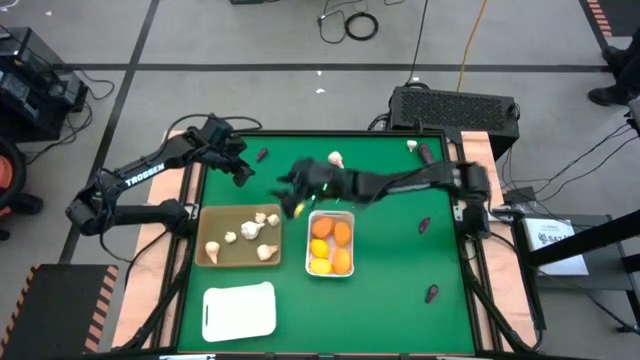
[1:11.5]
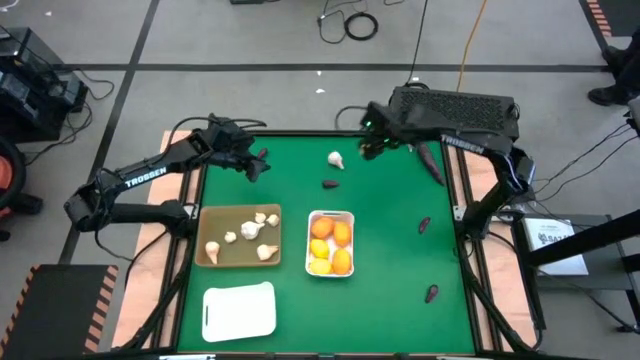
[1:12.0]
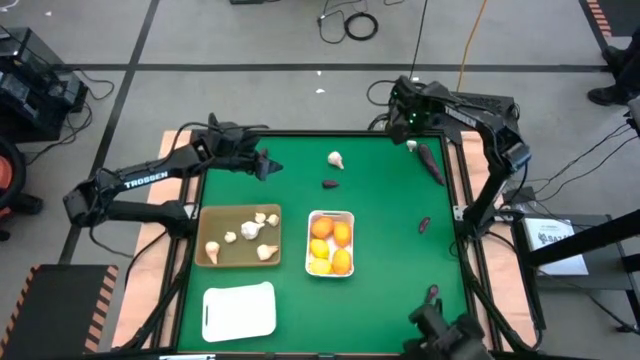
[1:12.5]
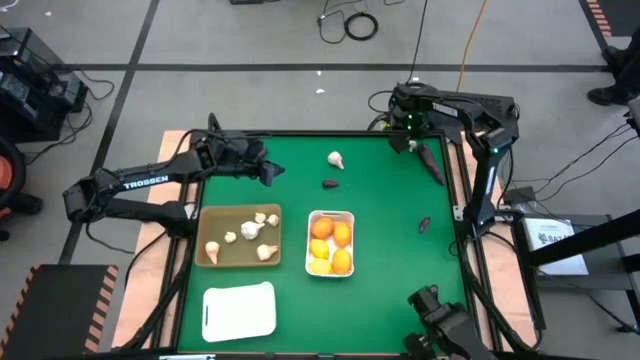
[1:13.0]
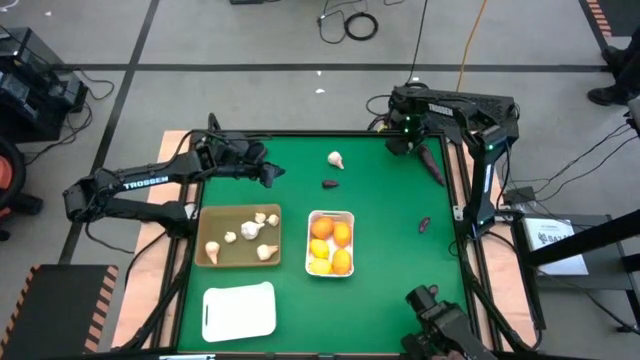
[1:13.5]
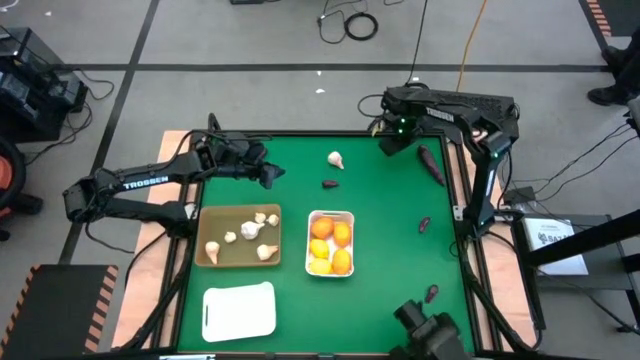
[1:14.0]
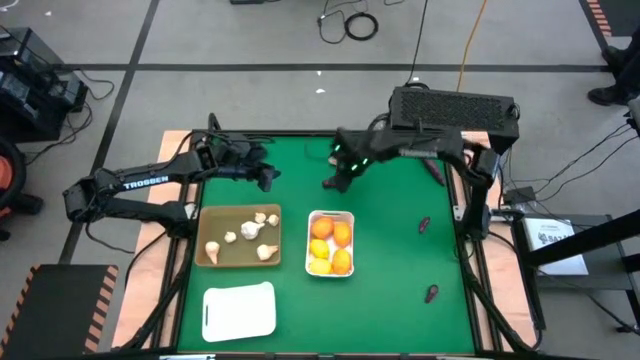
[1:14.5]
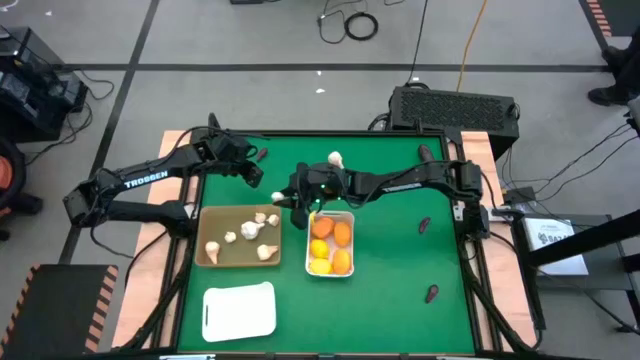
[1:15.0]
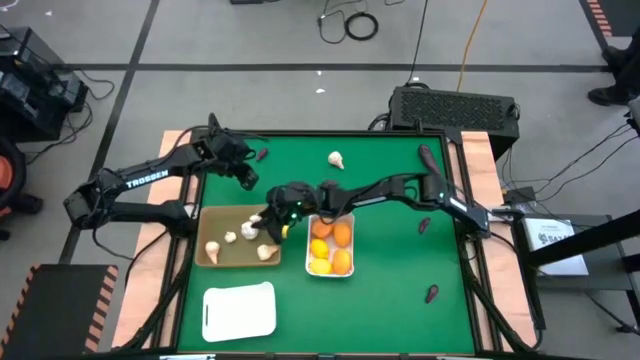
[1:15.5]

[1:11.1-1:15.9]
Task: Sort produce into baskets
Put the white garlic into the orange bin

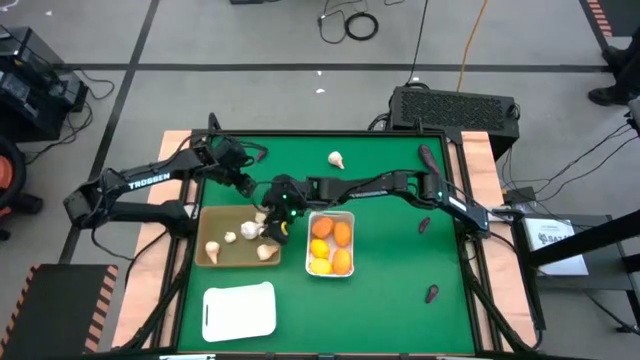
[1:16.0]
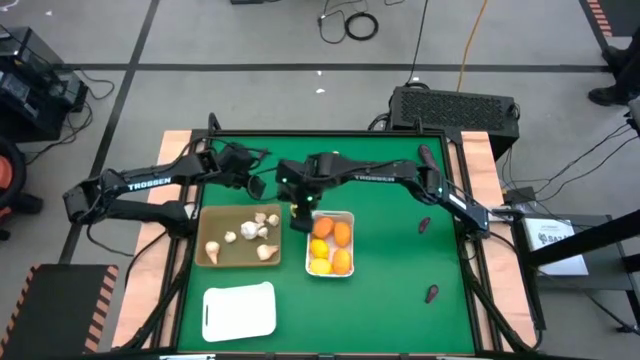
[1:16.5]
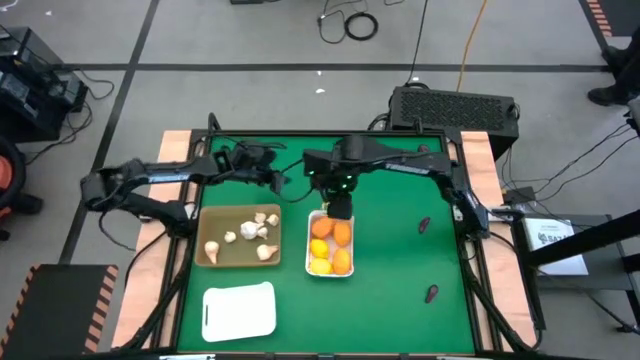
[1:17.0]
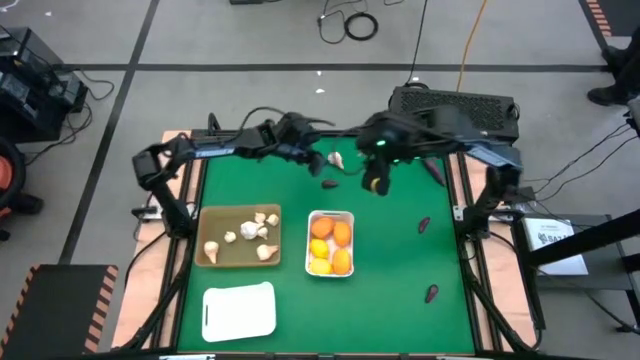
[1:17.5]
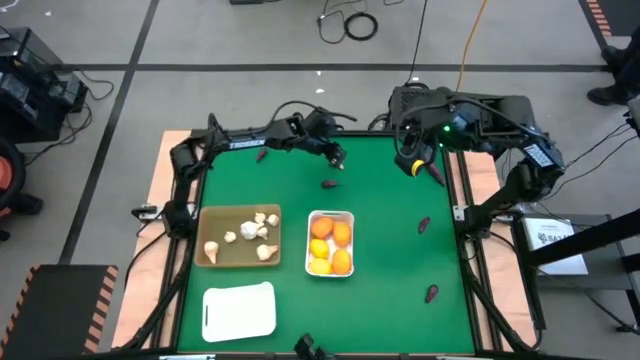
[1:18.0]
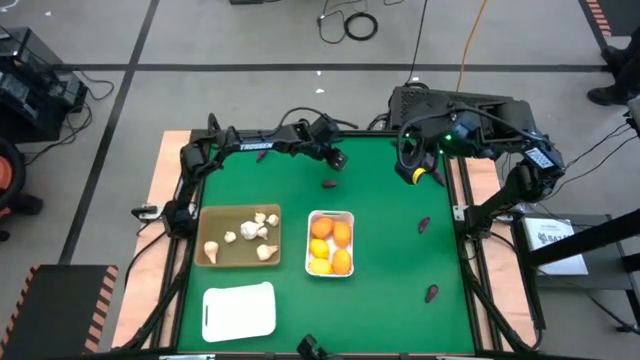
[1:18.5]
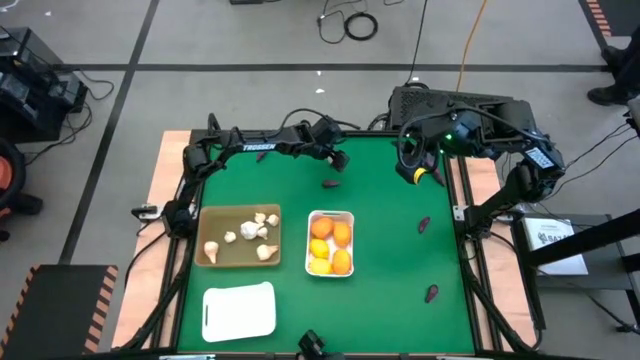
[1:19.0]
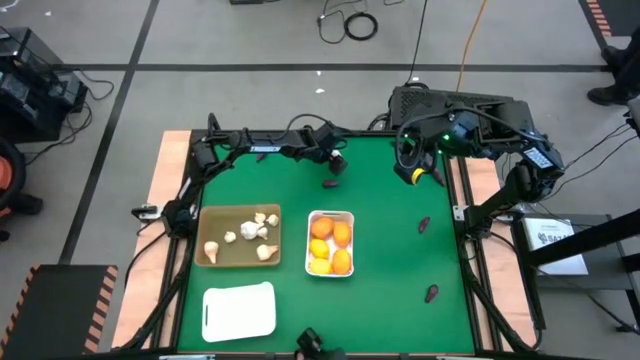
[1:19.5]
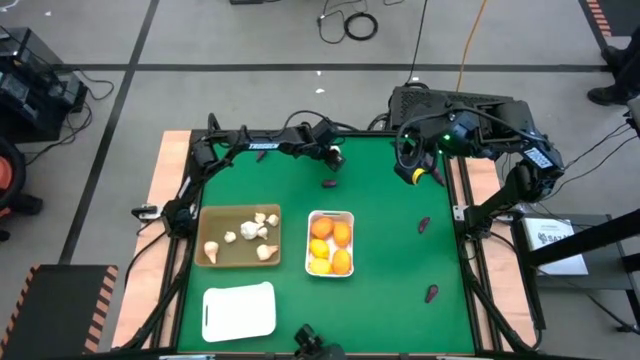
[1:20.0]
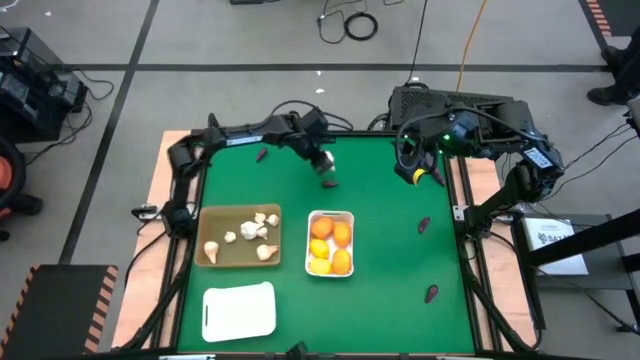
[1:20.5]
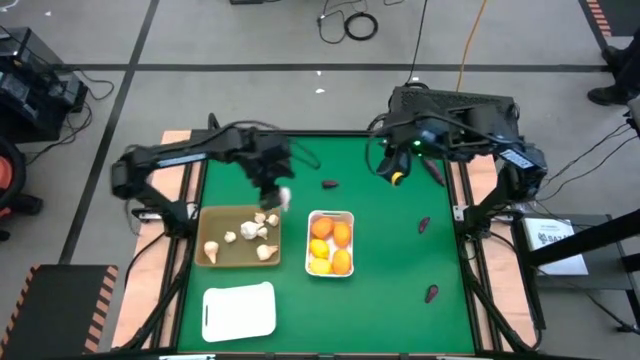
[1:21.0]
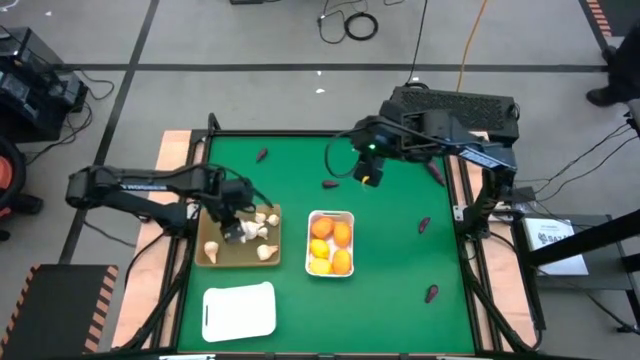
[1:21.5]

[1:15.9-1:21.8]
Put the white garlic into the orange bin

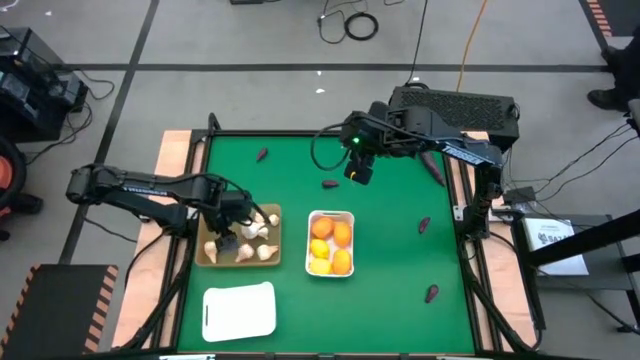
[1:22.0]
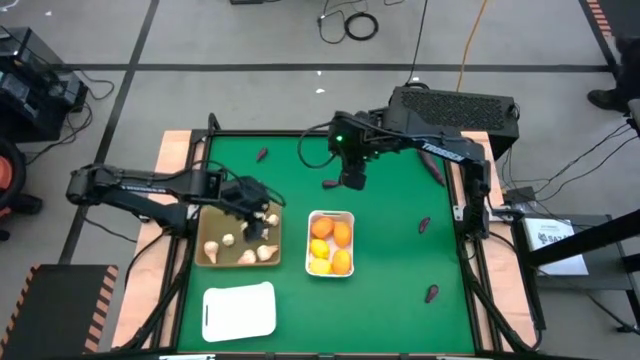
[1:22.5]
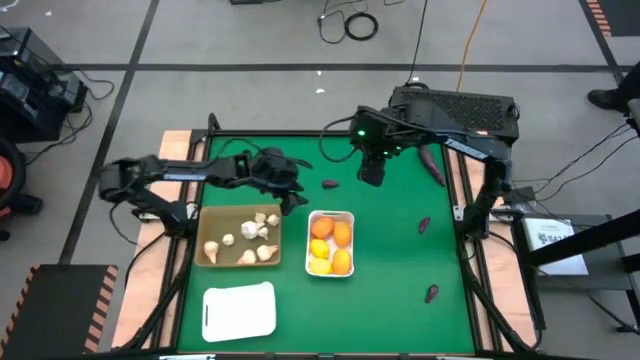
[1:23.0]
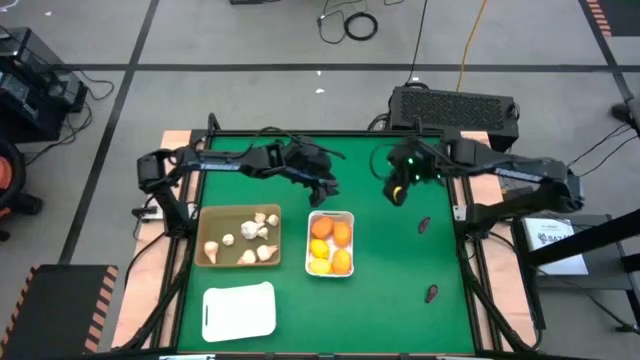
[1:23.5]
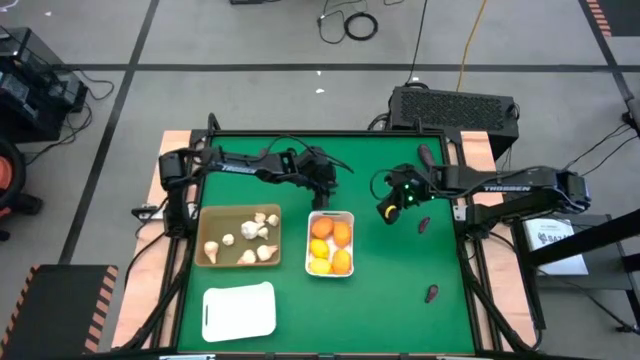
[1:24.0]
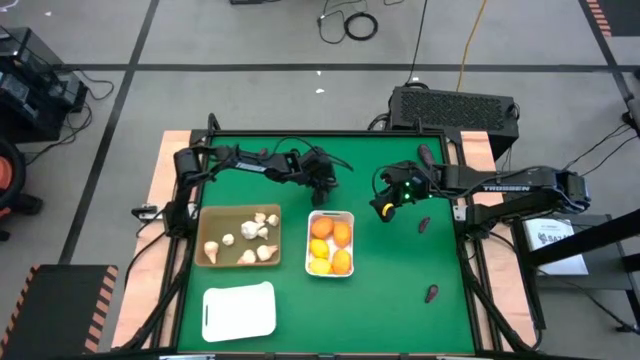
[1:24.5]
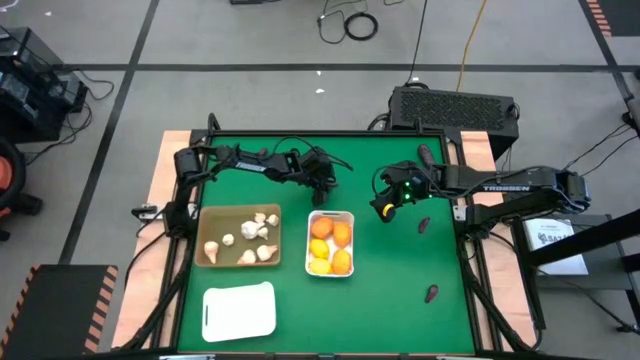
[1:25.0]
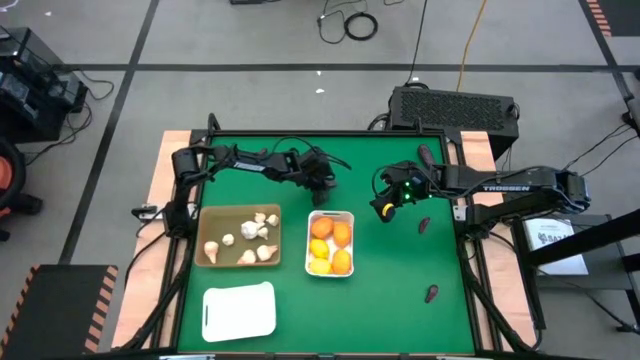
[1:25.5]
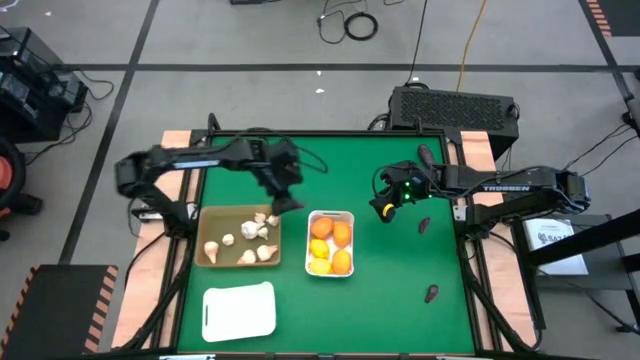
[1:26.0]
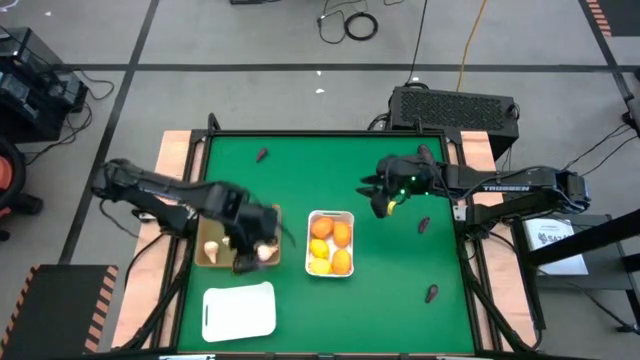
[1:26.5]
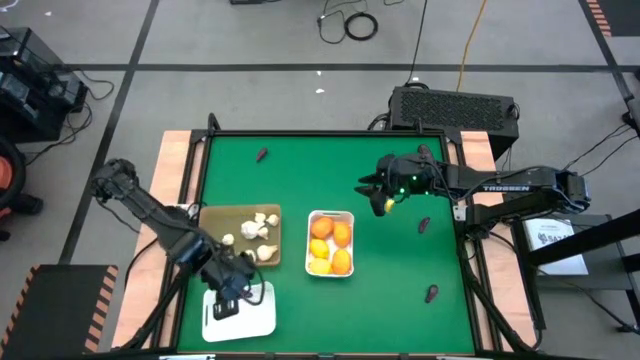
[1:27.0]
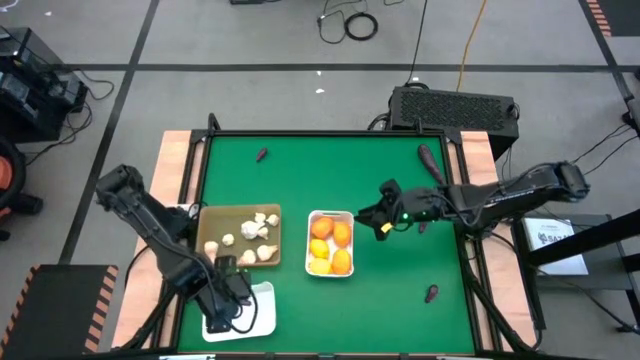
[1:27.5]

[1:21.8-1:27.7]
Put the purple eggplant into the bottom white bin

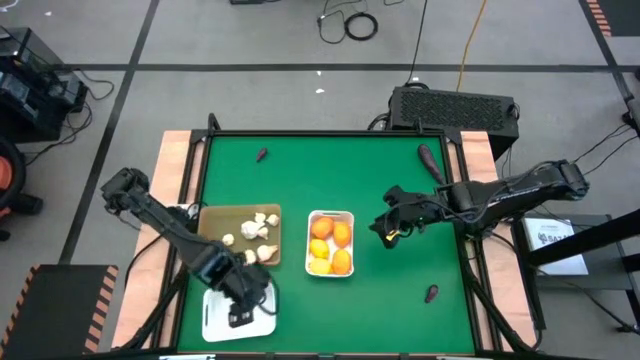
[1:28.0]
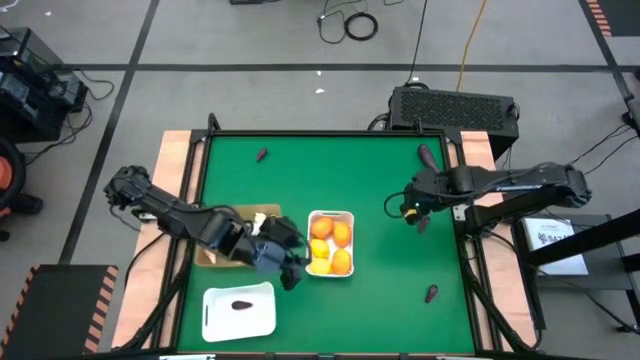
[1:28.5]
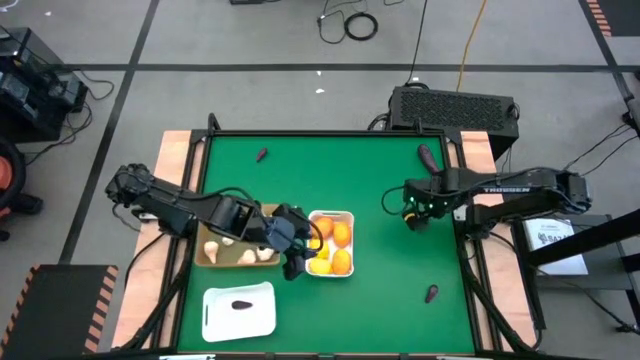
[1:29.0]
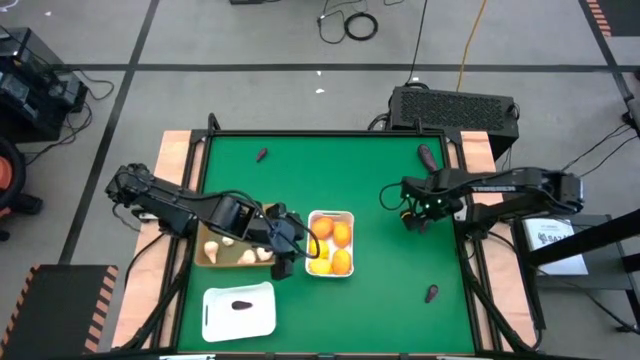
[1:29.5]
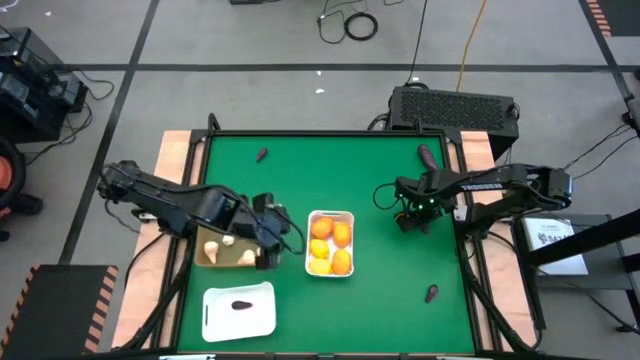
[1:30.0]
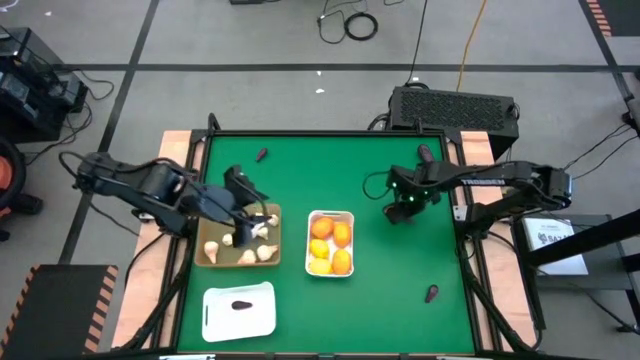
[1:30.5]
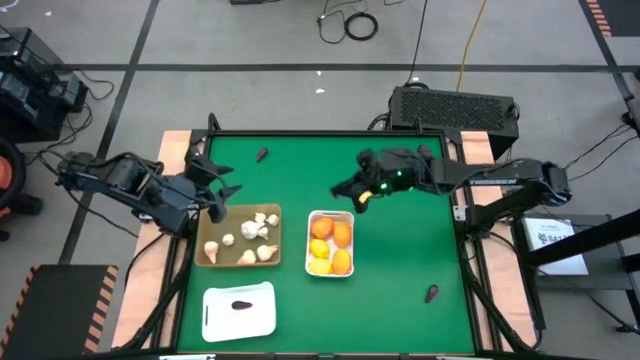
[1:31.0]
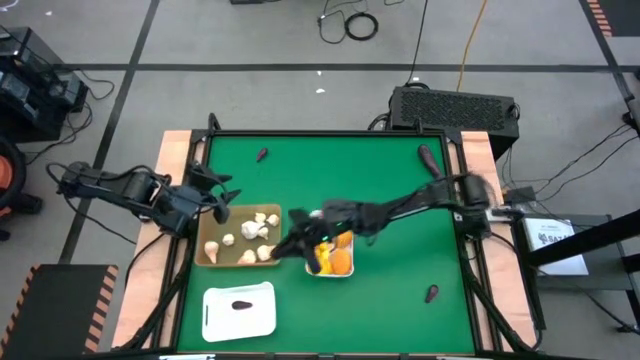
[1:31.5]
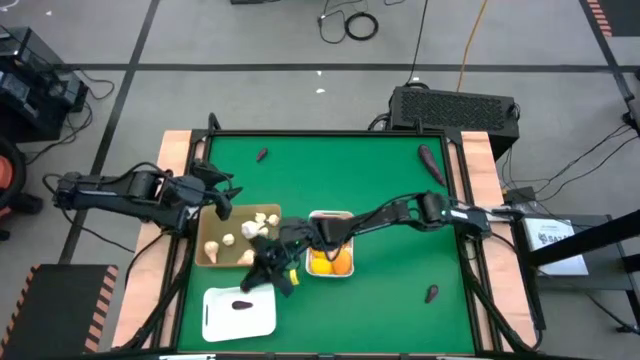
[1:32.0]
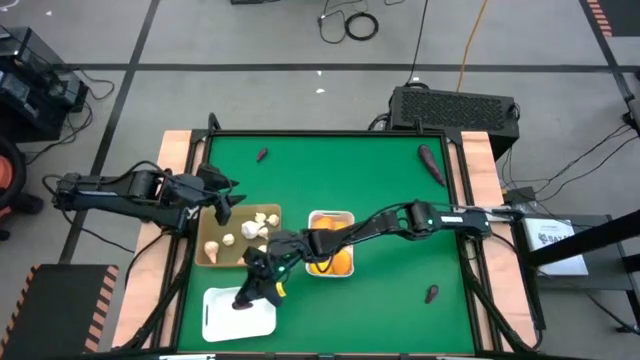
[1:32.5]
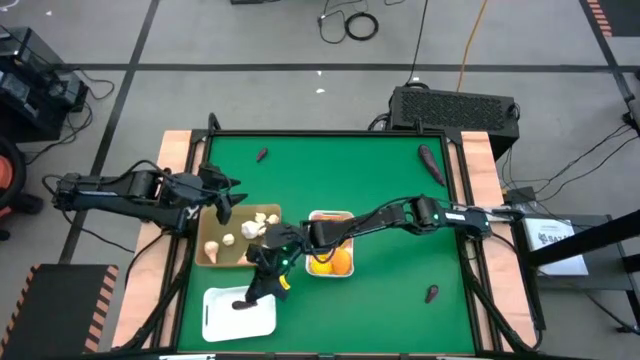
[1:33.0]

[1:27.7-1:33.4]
Put the purple eggplant into the bottom white bin

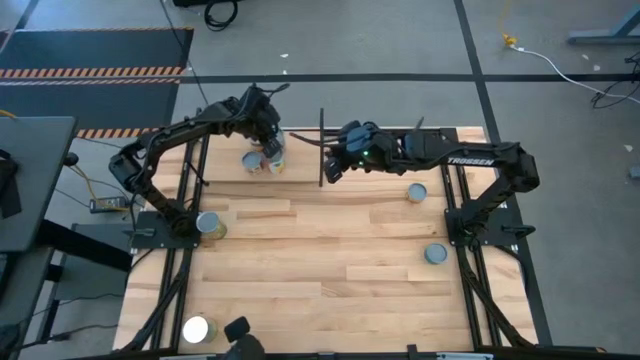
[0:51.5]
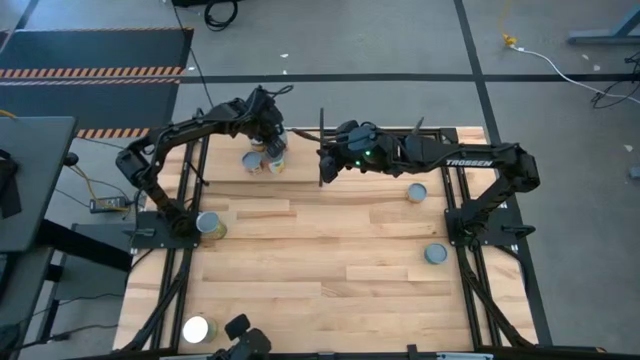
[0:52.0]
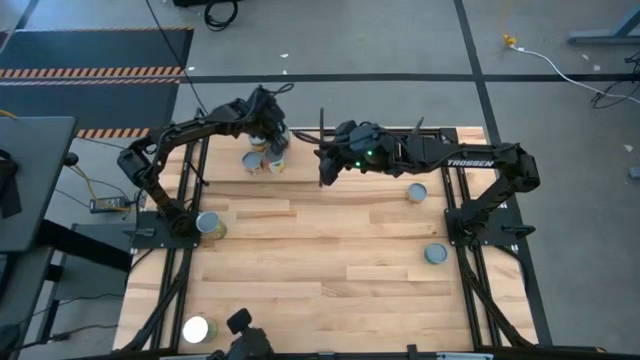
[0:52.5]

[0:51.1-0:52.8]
Task: Pick and place cans onto a shelf
Adjust the canned spaghetti sauce on the shelf
